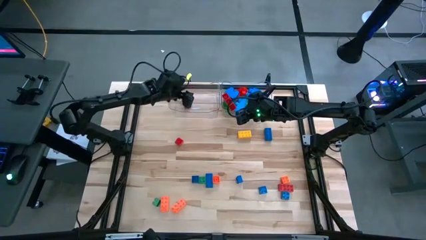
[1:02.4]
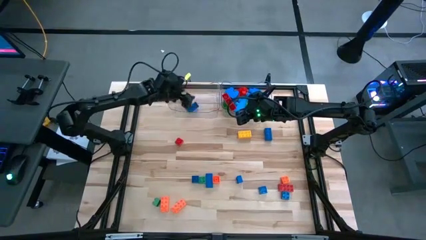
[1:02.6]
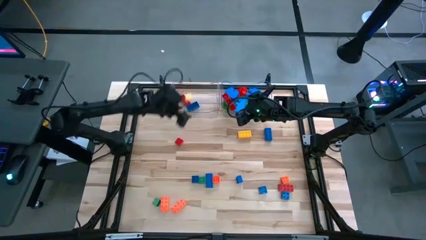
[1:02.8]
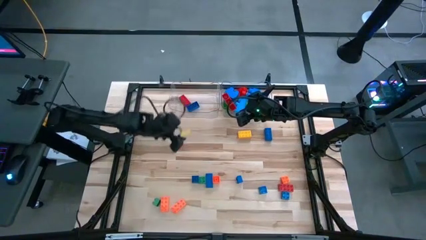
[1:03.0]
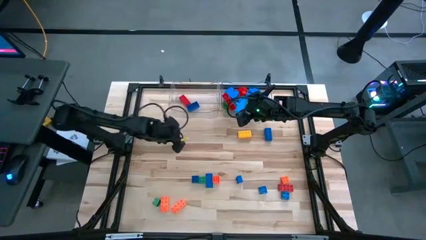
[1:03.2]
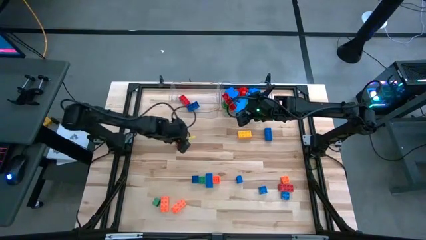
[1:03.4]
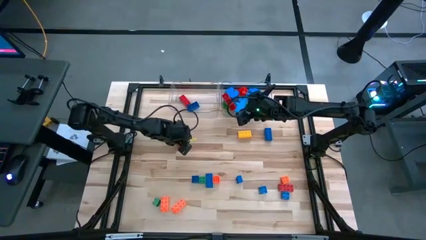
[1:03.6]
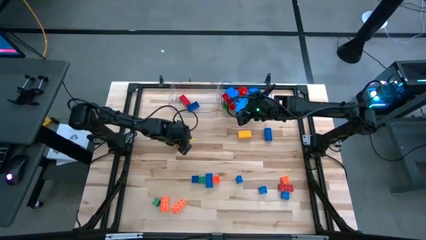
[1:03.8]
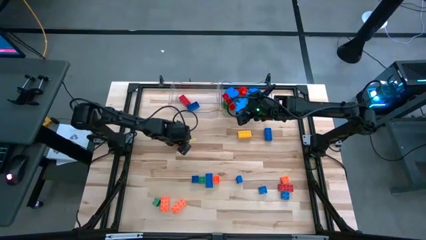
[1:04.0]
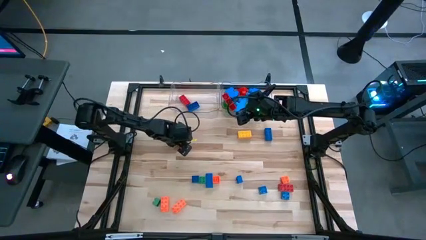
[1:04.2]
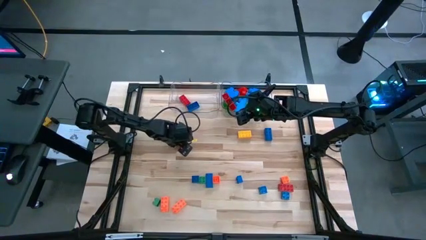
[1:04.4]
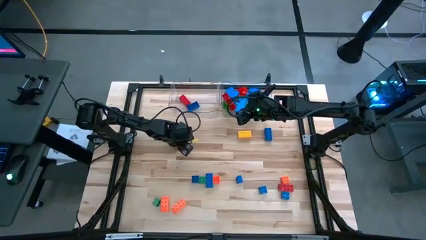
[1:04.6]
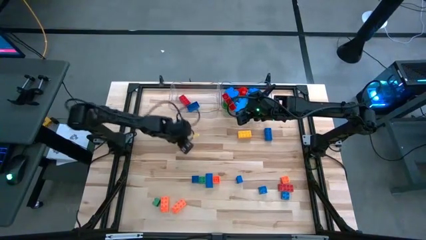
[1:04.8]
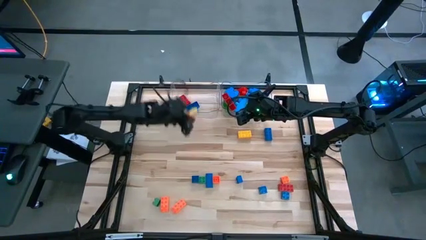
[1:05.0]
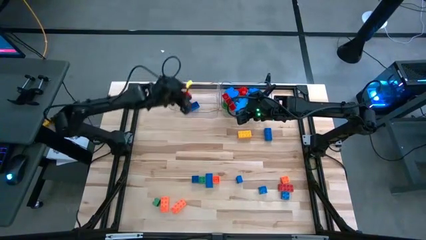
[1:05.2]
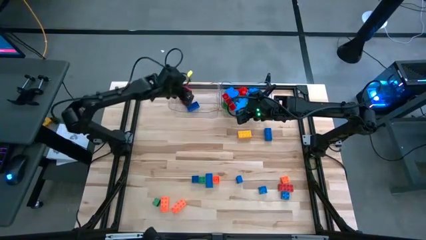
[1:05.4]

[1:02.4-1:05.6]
Task: Sort blocks by size
Put the red lego piece into the left transparent bin

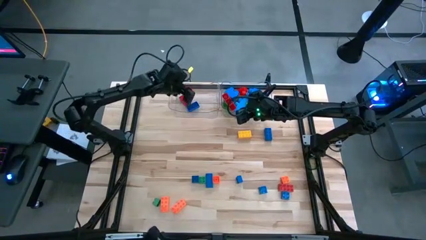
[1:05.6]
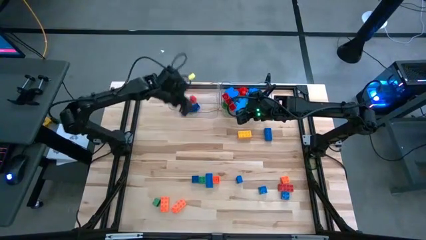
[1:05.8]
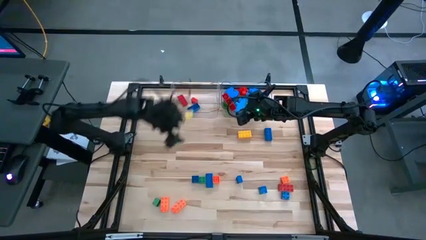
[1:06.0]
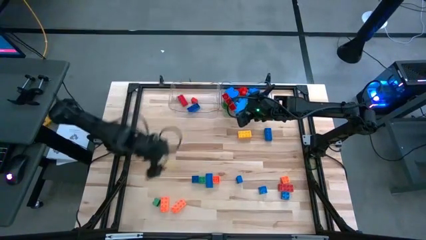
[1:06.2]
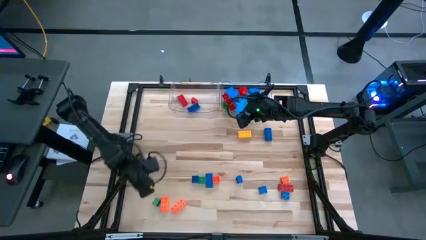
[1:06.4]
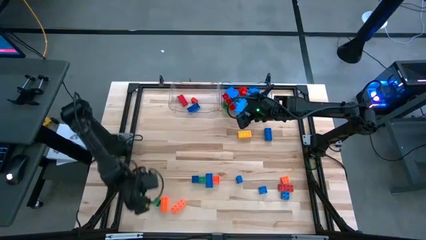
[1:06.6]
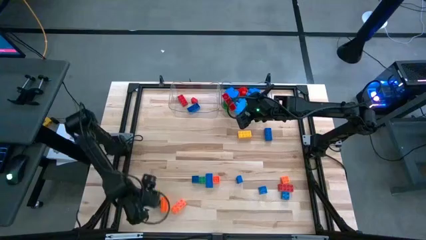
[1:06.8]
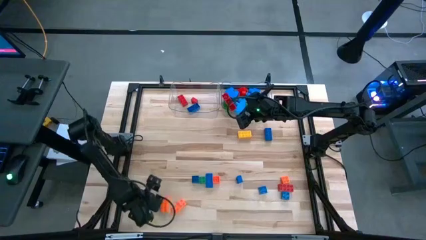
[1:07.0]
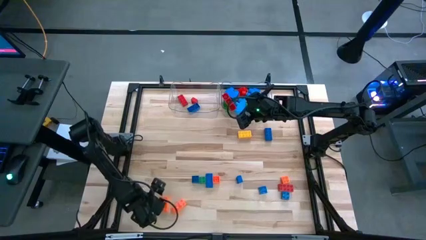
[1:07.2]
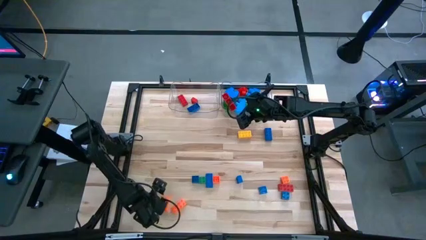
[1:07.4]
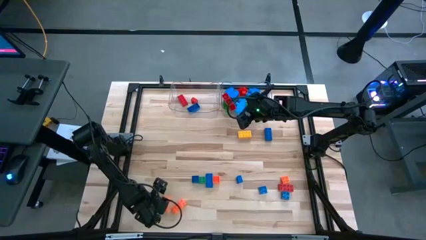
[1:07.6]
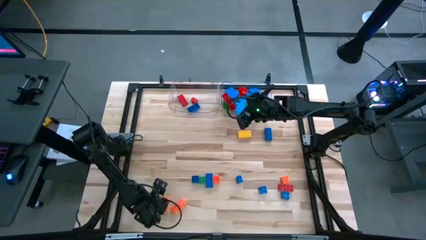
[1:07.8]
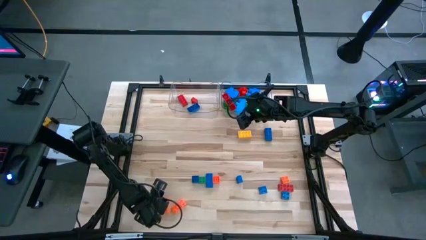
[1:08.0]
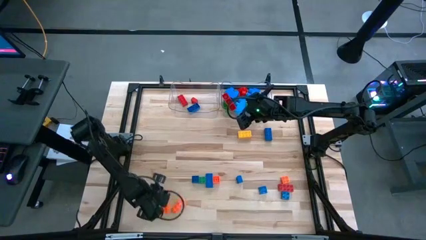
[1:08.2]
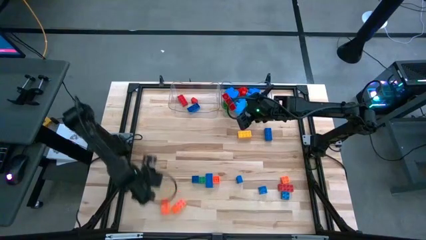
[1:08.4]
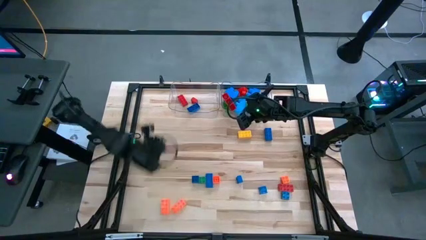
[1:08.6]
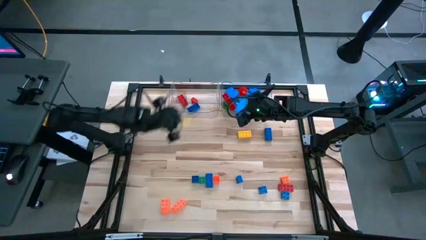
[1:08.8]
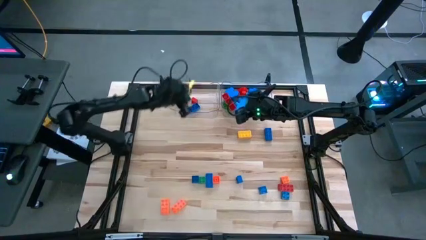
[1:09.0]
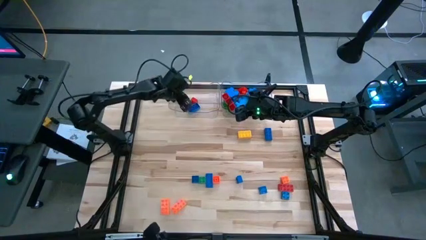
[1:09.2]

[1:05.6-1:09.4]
Put the green lego piece into the left transparent bin

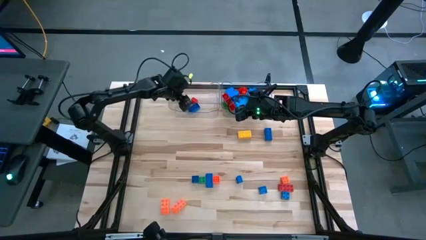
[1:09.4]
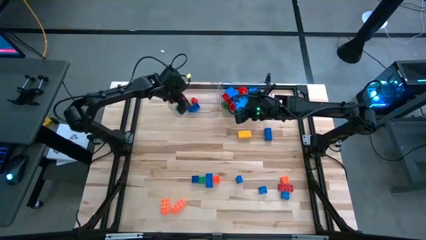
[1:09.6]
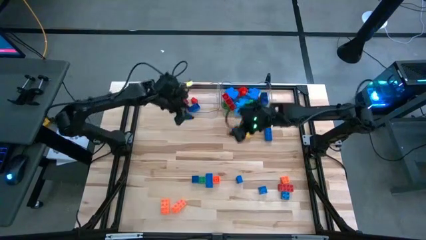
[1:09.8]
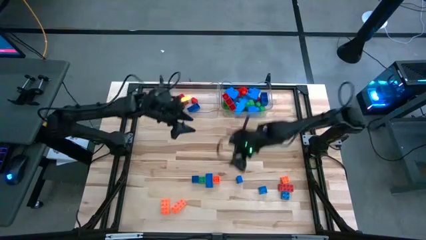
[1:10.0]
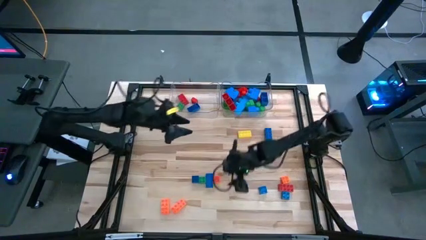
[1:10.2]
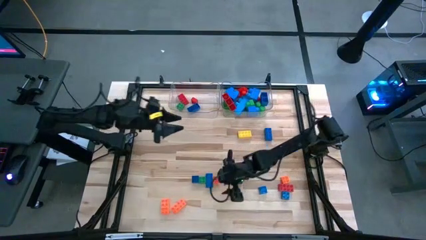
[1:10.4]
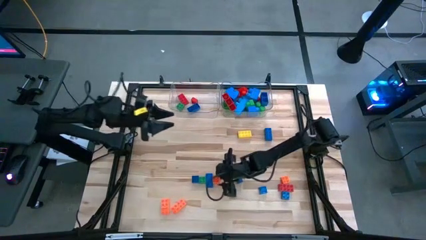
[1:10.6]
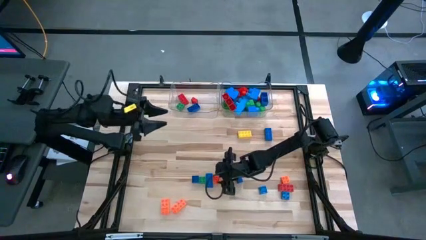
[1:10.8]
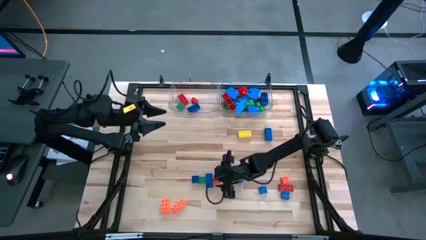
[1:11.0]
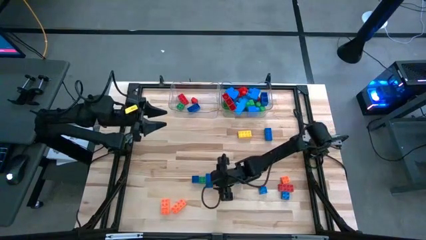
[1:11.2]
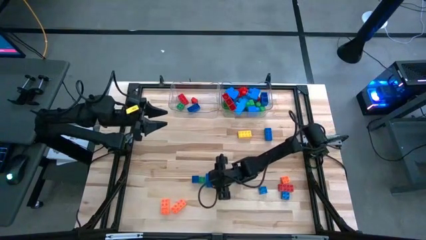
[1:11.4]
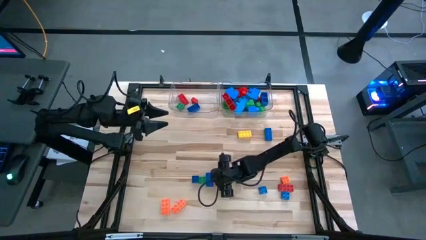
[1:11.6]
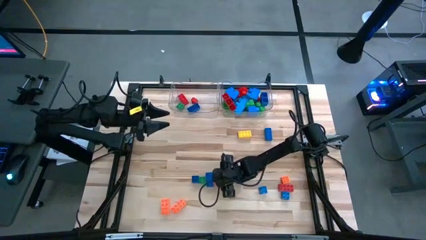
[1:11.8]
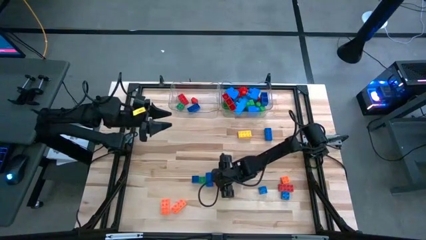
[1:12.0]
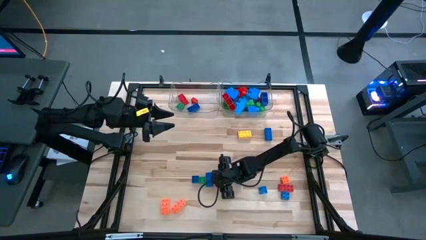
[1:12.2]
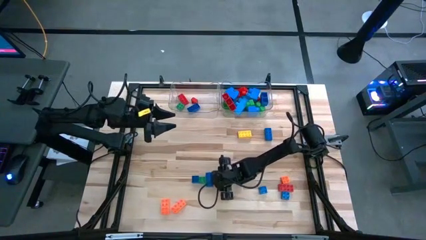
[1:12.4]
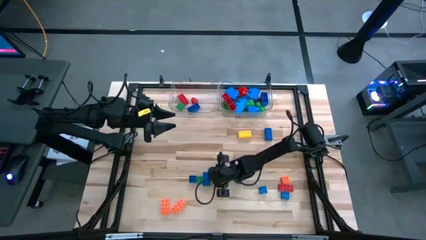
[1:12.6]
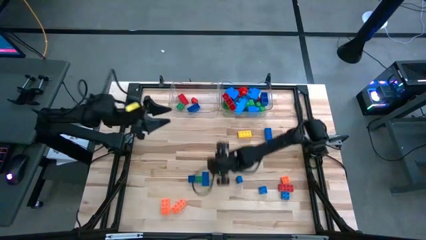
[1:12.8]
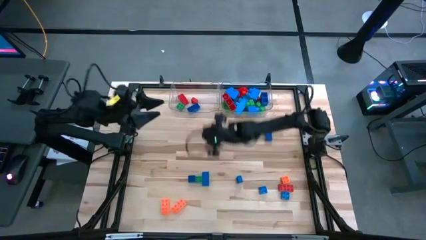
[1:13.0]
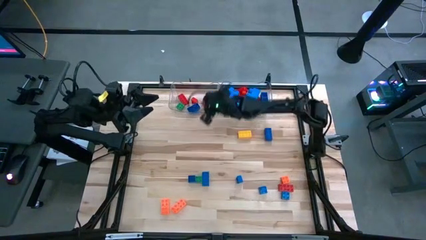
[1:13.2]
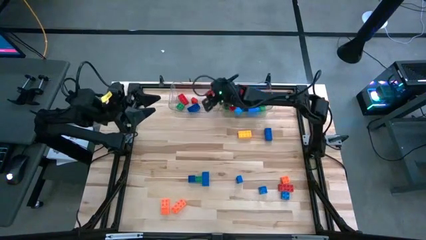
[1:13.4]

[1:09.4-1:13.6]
Put the orange lego piece into the left transparent bin

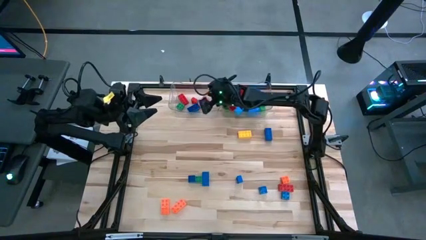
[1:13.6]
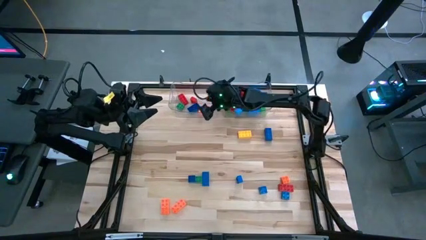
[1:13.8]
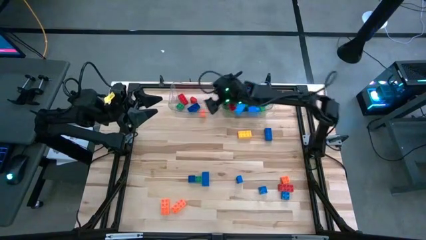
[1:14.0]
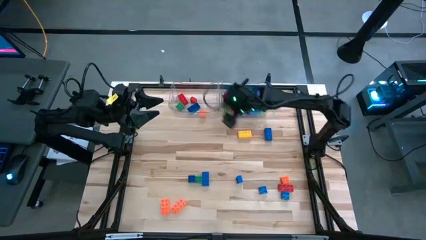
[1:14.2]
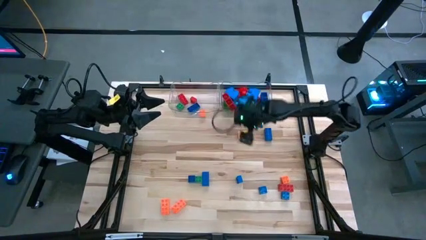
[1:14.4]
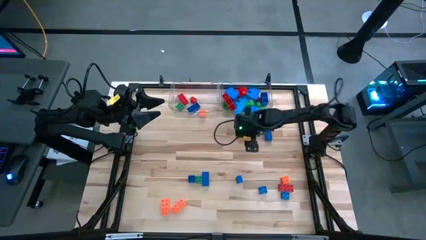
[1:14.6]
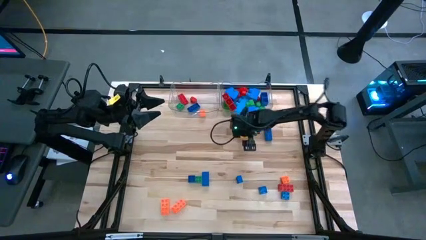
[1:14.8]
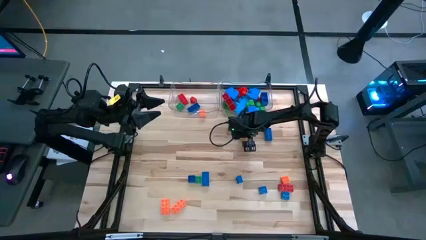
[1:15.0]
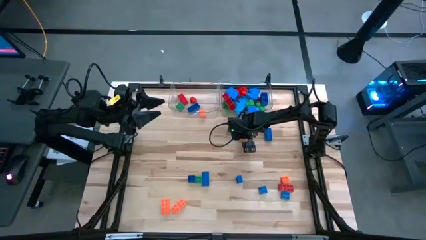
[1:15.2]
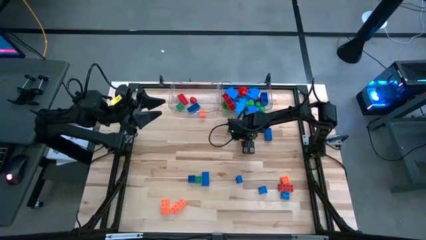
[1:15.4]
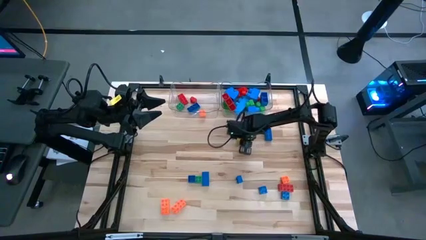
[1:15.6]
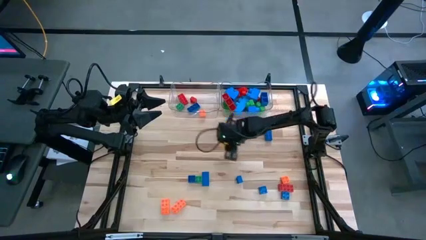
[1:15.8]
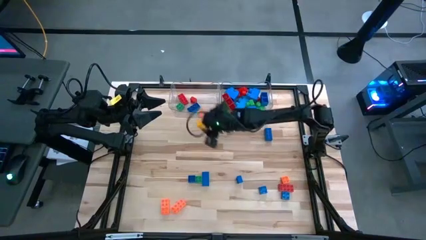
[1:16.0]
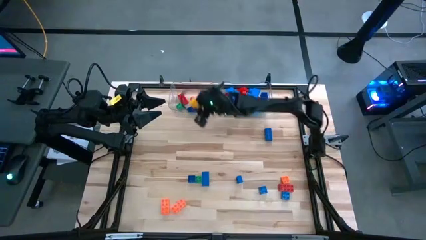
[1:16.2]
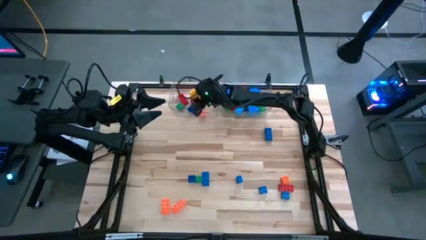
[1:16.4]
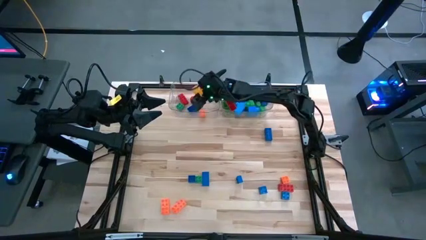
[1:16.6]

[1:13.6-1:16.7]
Put the yellow lego piece into the left transparent bin

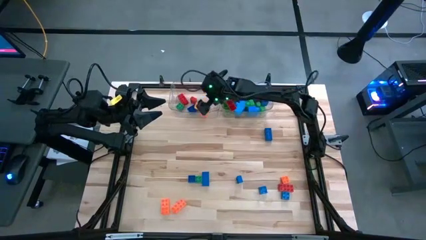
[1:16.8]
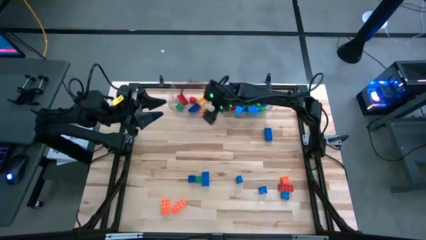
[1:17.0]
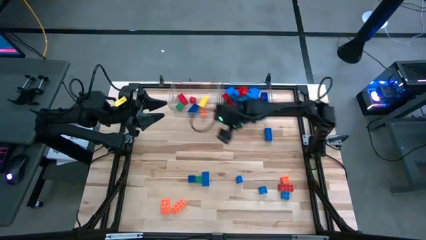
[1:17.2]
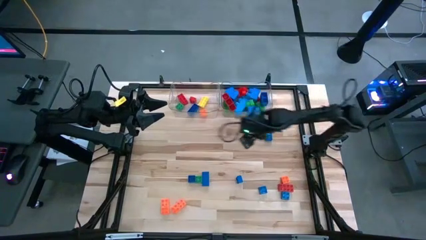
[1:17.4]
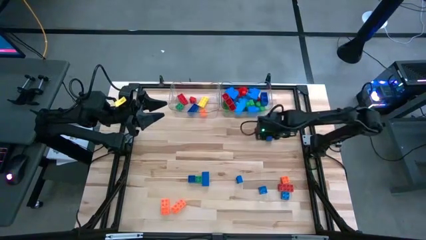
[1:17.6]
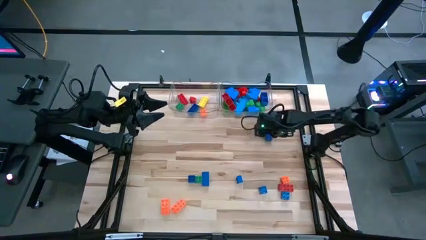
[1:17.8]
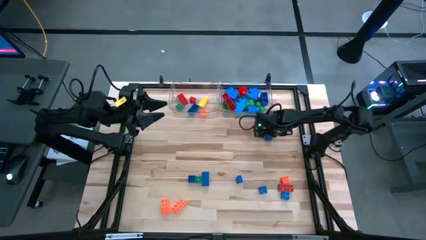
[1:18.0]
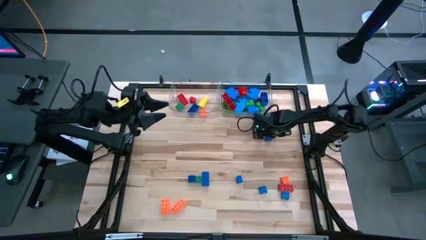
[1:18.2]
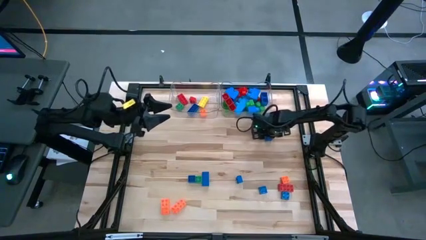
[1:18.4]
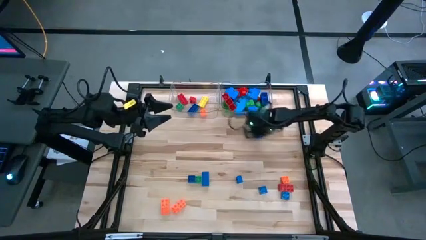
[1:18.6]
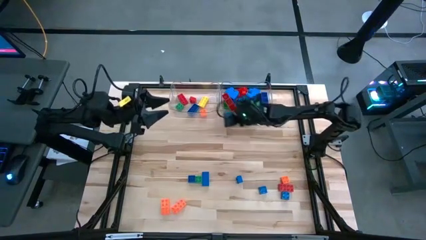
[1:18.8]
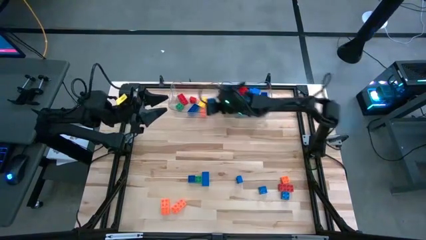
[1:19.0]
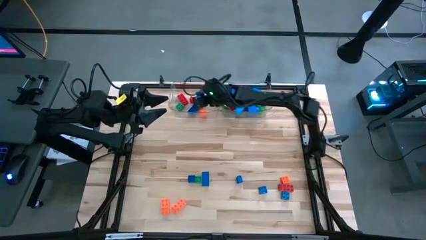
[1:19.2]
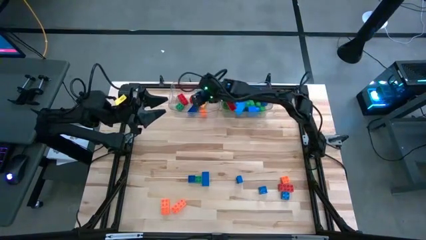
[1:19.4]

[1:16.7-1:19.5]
Put the blue lego piece into the left transparent bin
